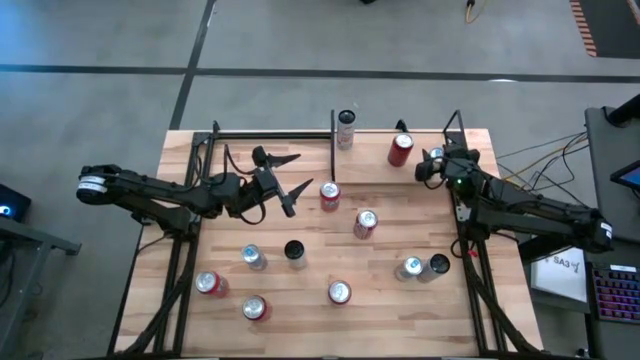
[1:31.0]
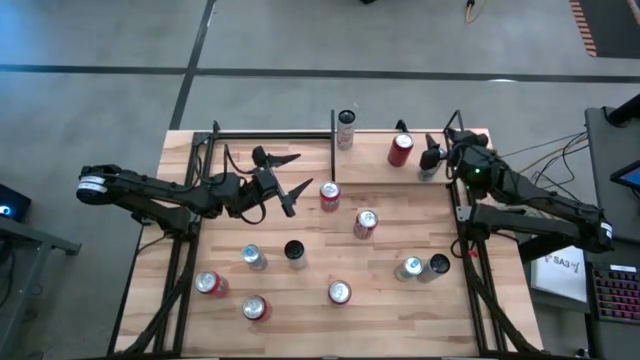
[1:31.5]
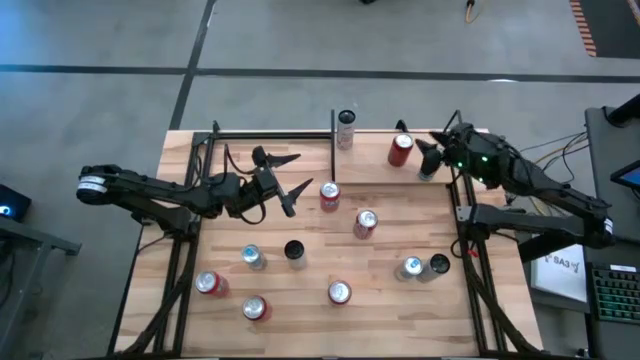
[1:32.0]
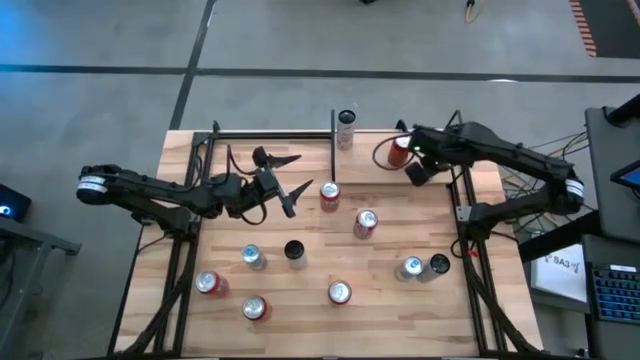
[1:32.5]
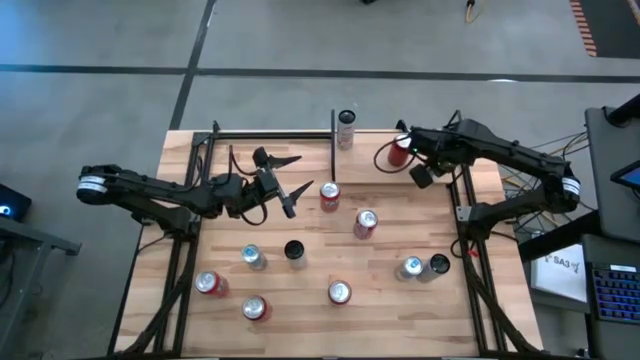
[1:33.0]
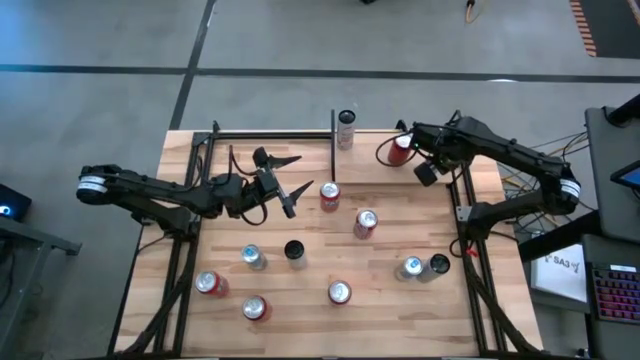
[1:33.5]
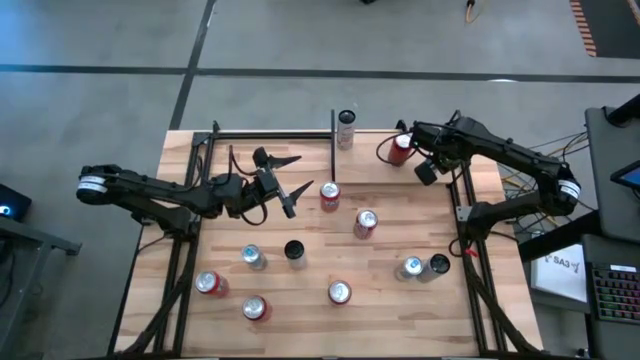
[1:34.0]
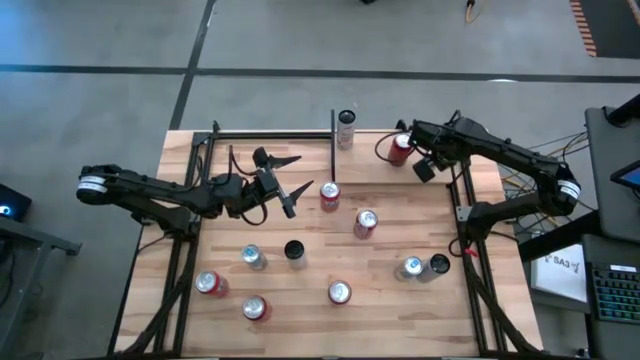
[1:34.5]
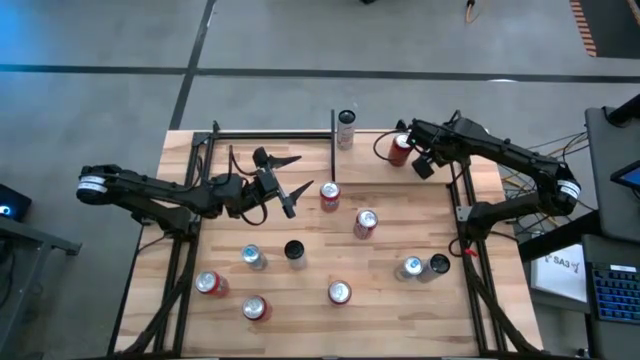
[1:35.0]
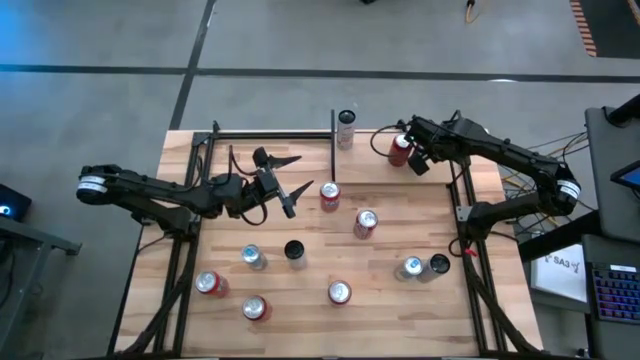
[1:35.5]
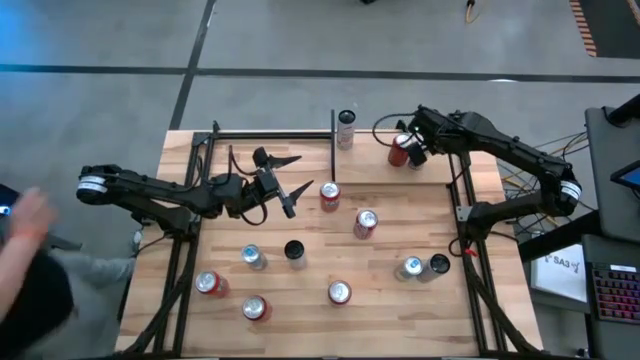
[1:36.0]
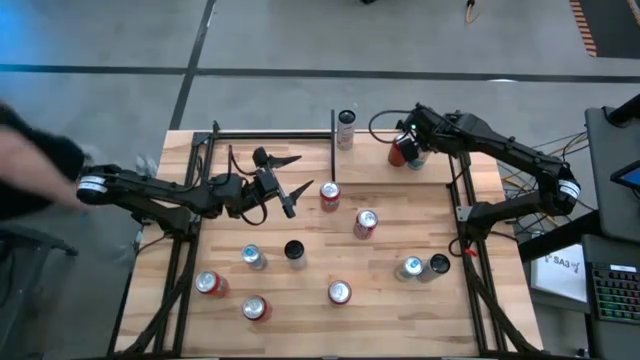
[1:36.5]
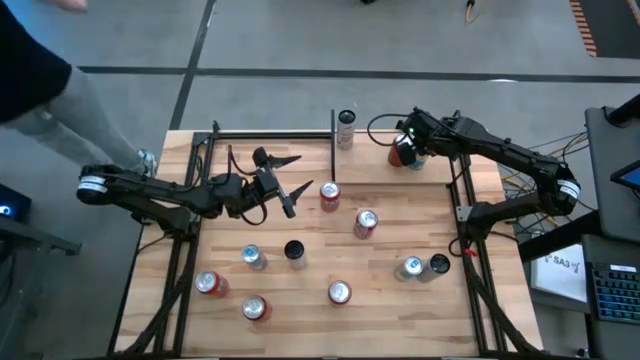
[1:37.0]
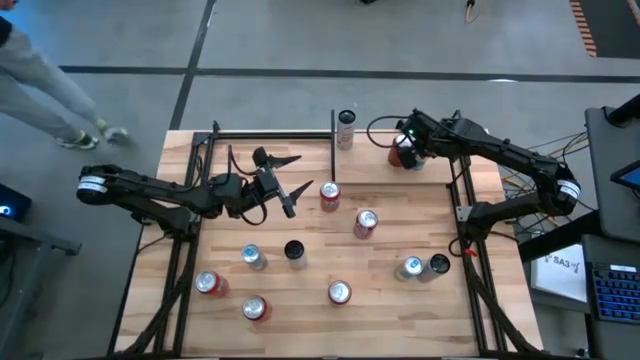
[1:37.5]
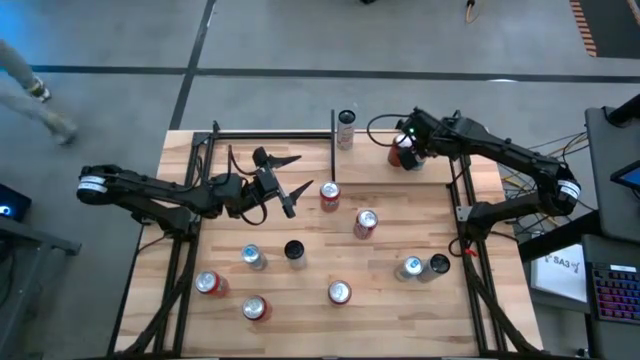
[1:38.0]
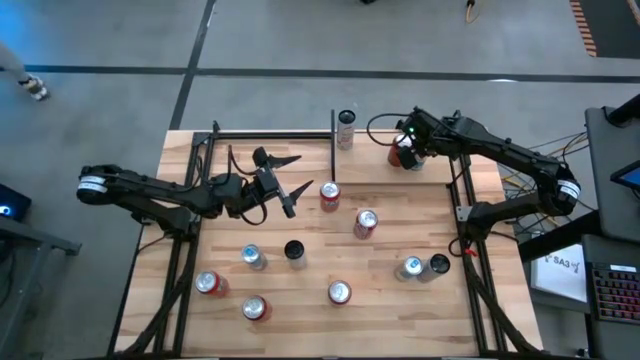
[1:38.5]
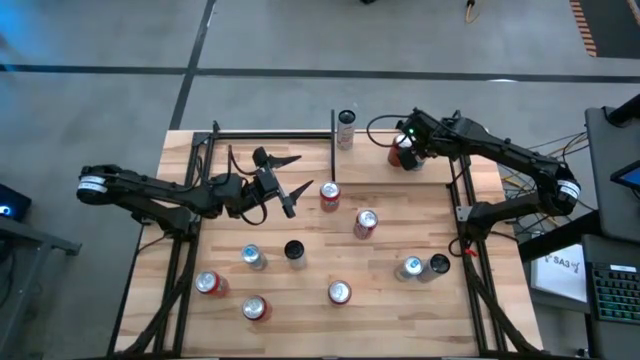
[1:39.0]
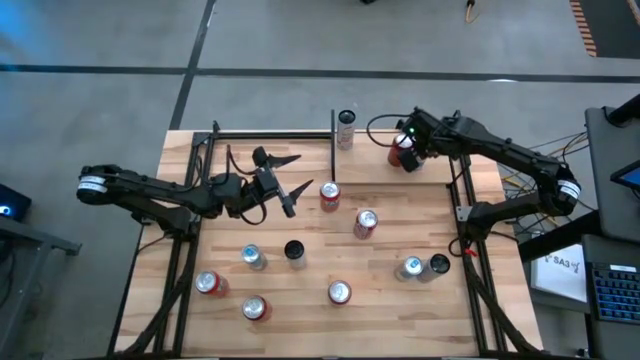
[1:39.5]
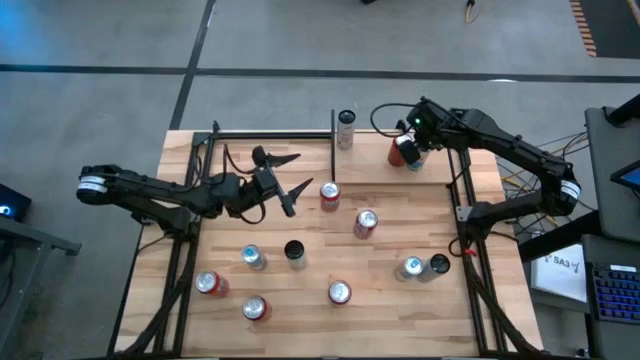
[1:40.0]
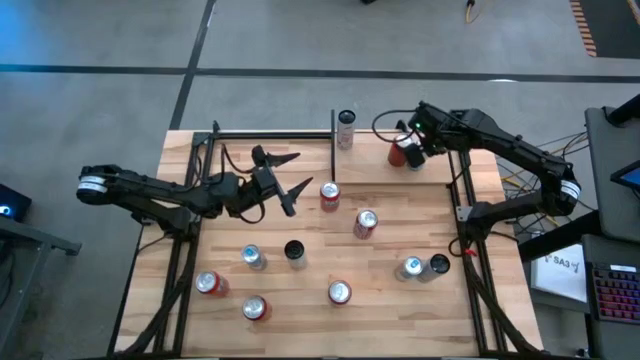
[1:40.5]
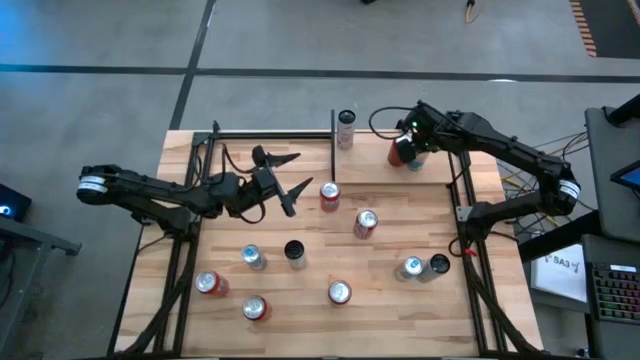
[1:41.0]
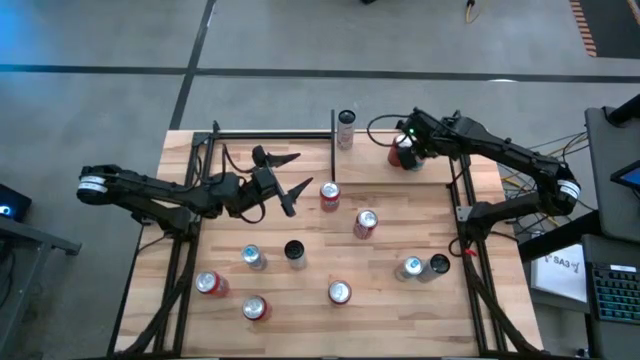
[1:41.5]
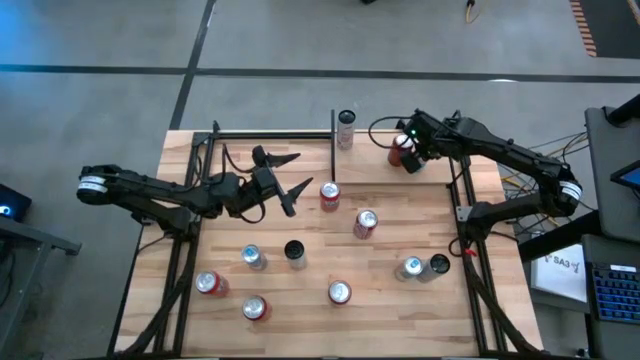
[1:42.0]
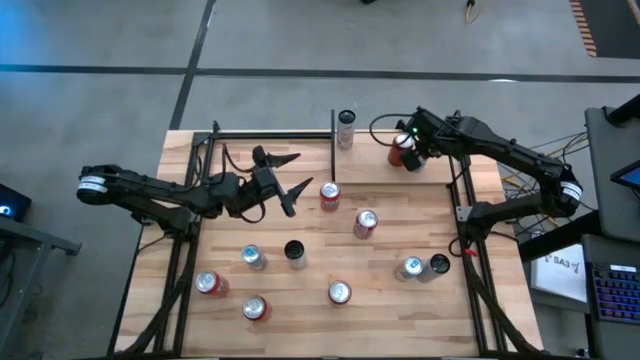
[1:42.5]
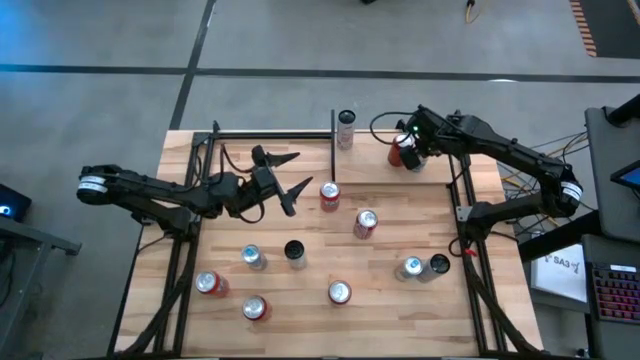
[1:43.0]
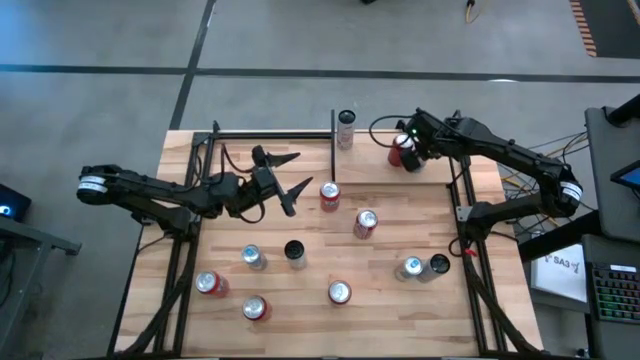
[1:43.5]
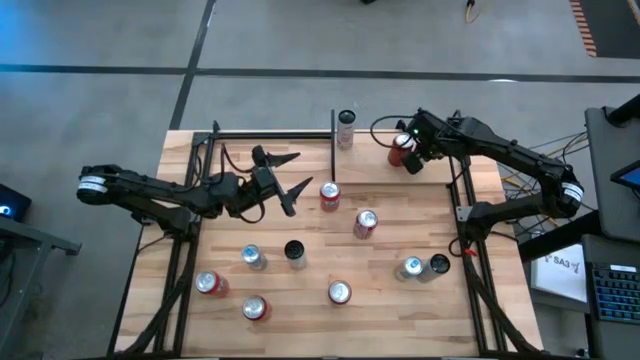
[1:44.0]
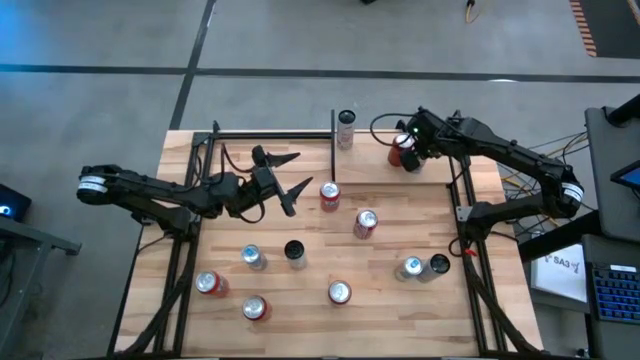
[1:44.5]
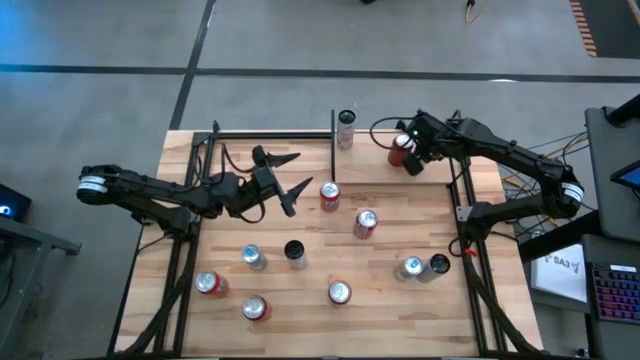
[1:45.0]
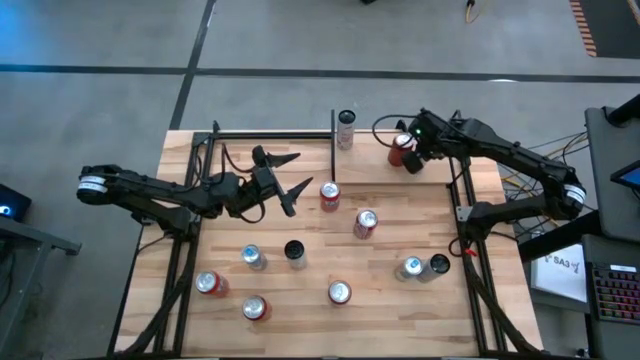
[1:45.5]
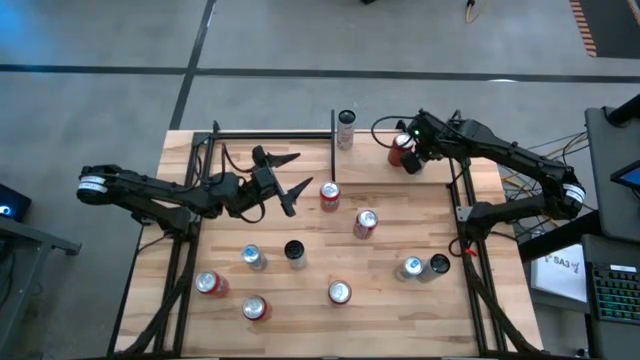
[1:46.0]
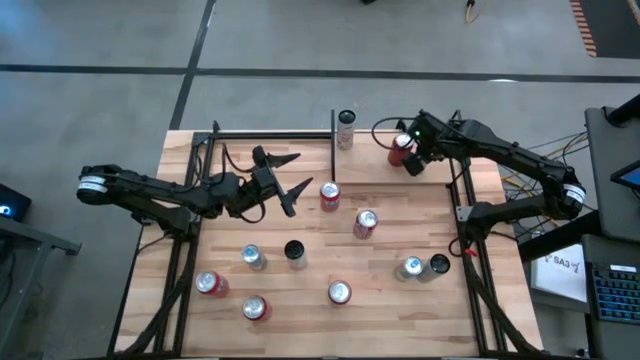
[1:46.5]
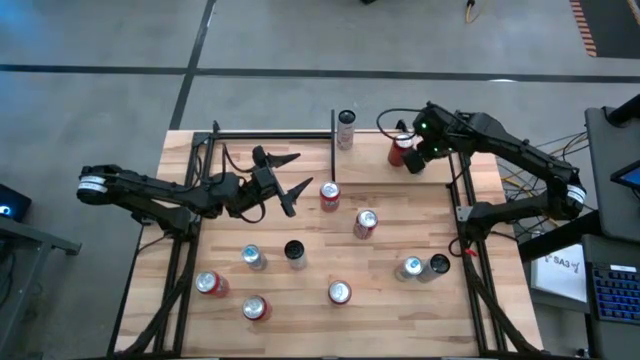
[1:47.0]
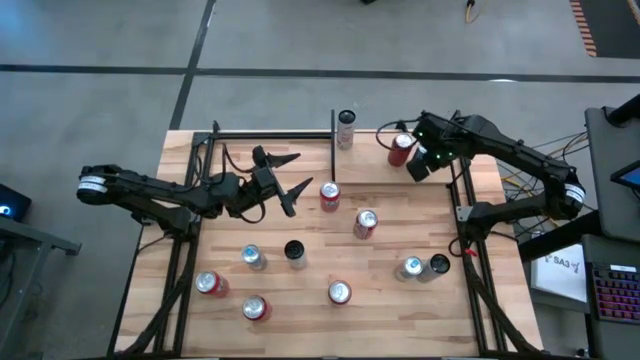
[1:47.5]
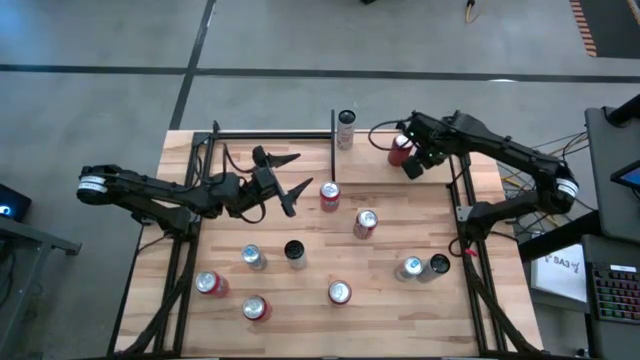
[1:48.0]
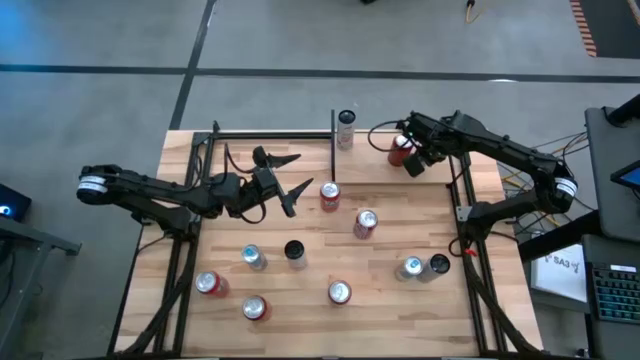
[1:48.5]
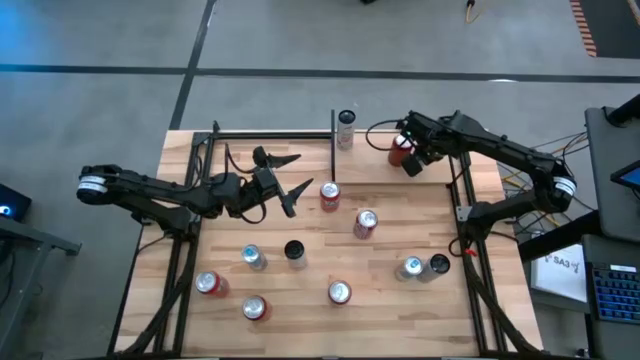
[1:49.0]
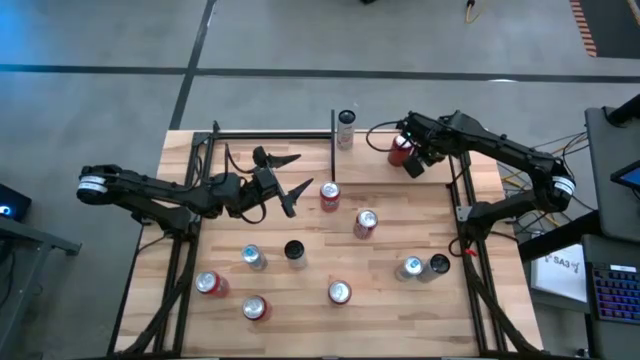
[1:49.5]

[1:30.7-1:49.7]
Task: Place canned beverage on shelf
Put the top blue soda can on the shelf

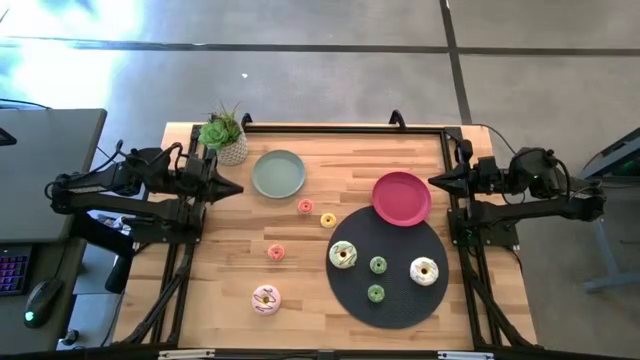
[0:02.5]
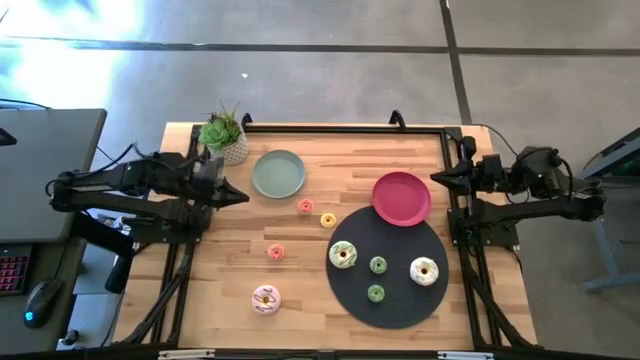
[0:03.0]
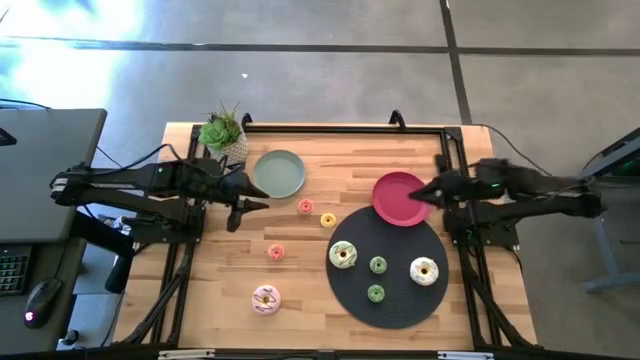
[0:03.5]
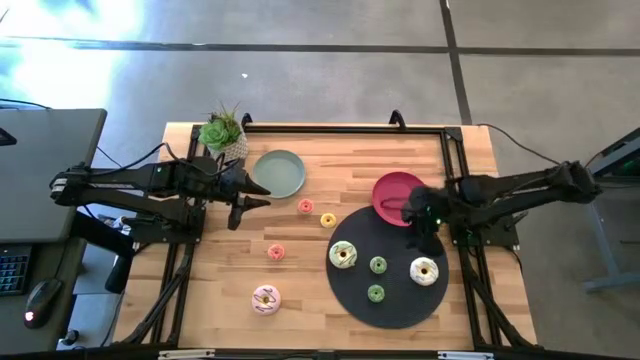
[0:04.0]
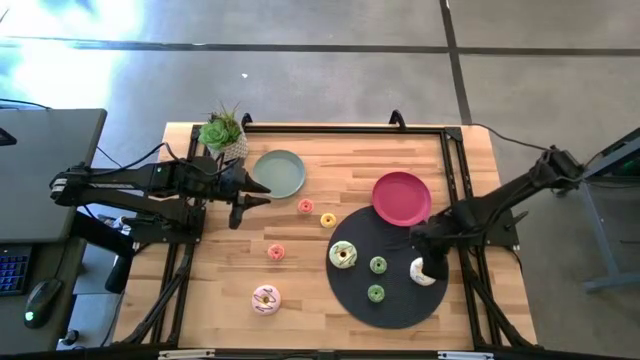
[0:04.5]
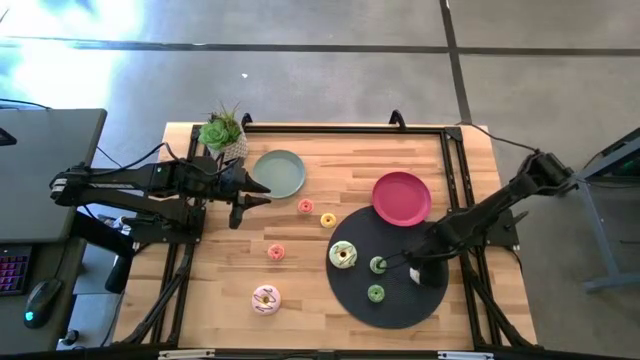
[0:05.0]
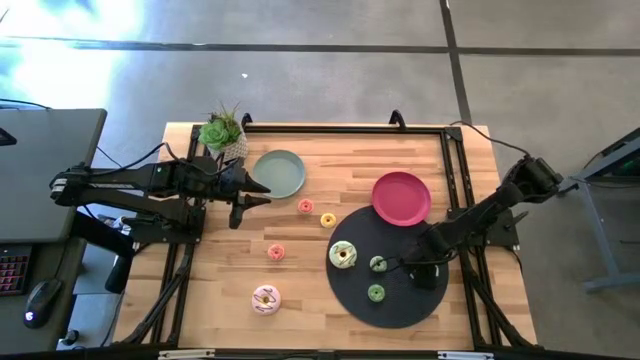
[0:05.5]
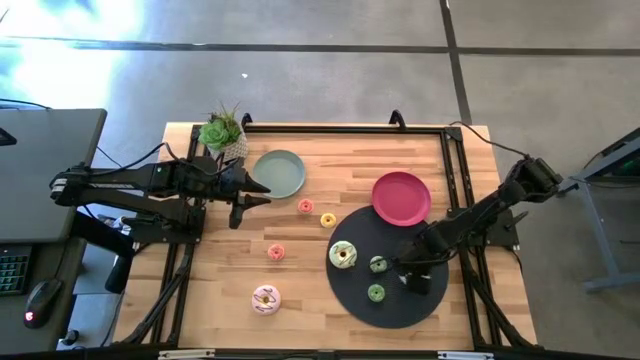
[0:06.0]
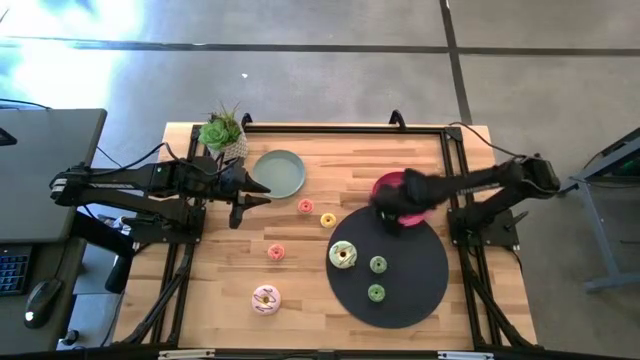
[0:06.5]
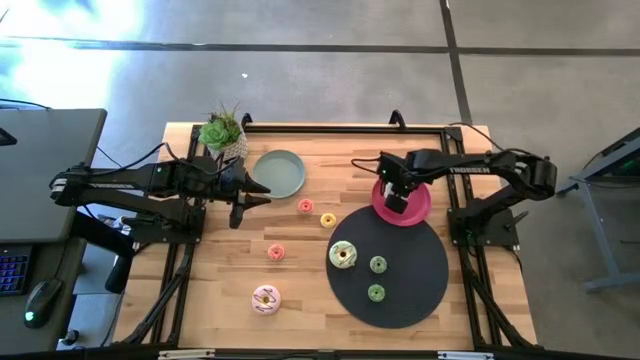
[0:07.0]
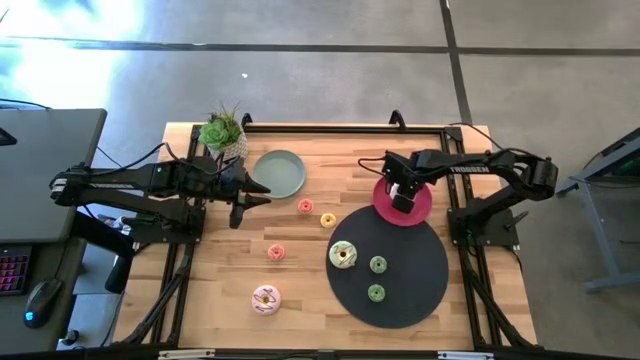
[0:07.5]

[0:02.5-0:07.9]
Task: Pick & Place donuts
Put the big white donut on the pink plate
